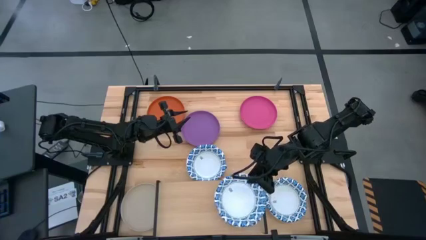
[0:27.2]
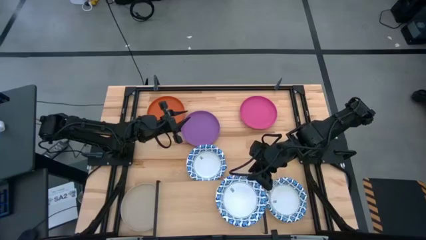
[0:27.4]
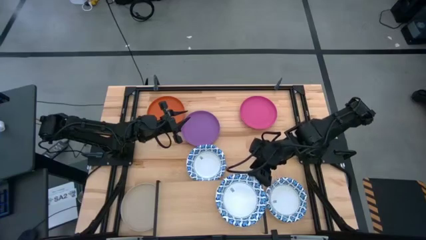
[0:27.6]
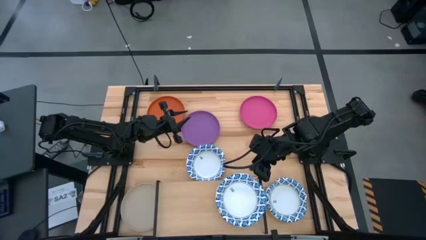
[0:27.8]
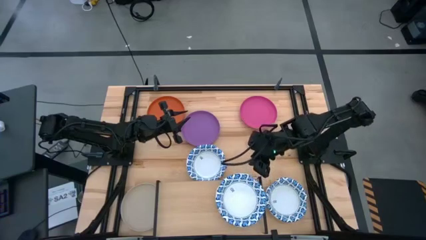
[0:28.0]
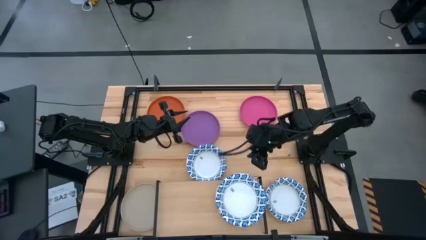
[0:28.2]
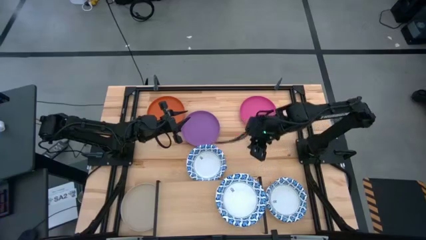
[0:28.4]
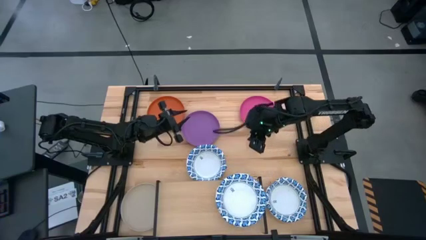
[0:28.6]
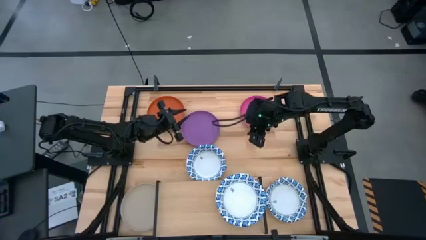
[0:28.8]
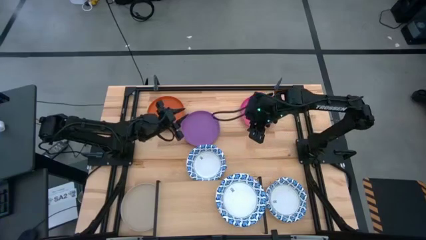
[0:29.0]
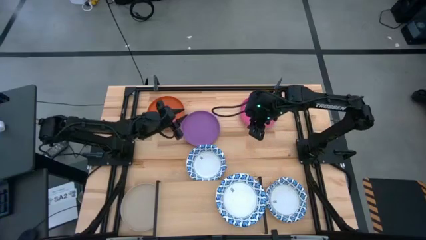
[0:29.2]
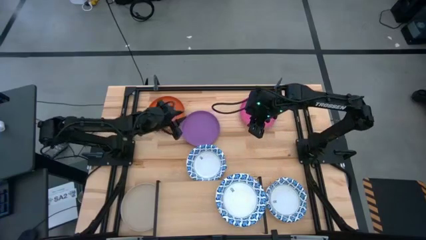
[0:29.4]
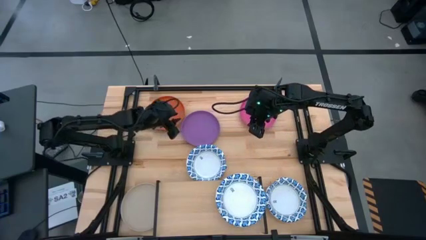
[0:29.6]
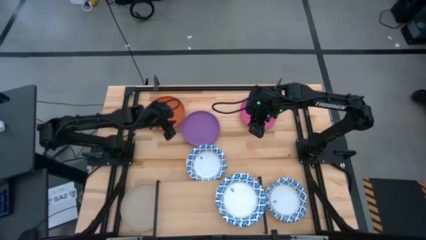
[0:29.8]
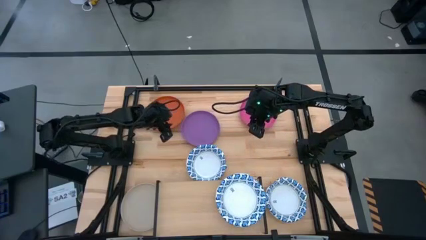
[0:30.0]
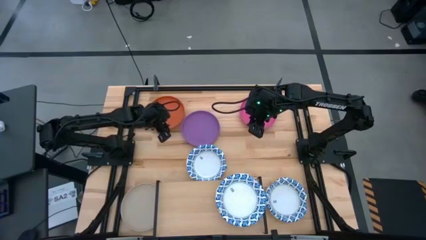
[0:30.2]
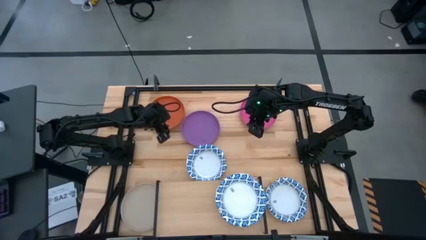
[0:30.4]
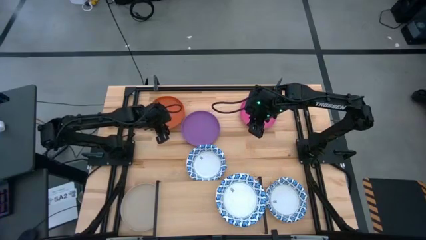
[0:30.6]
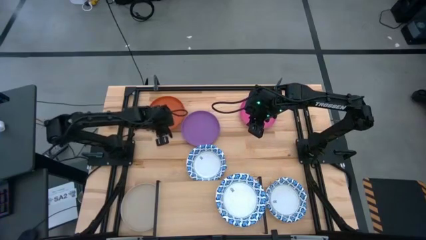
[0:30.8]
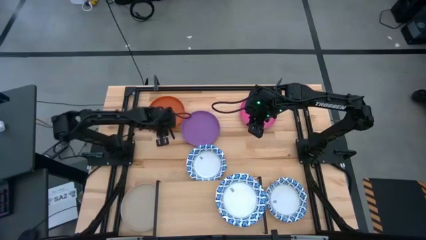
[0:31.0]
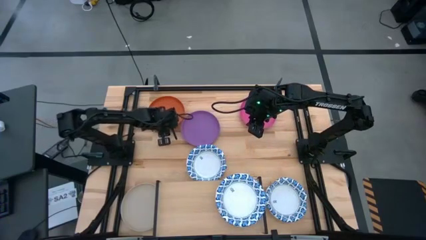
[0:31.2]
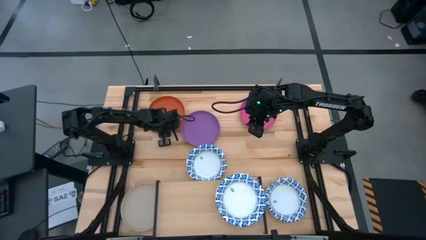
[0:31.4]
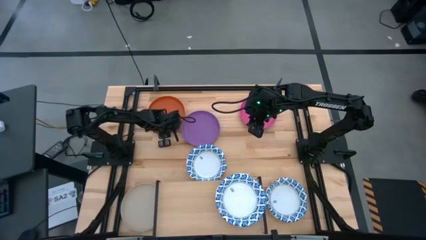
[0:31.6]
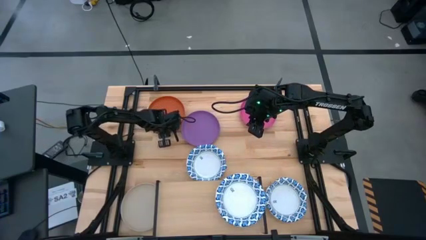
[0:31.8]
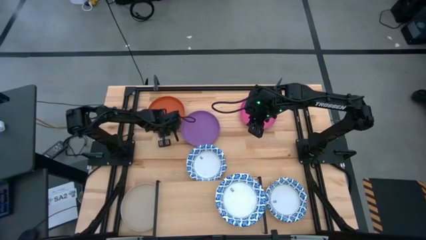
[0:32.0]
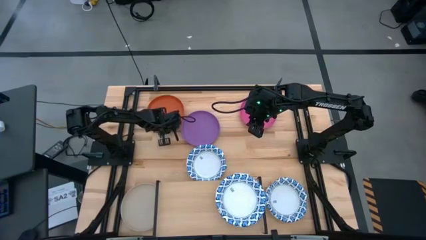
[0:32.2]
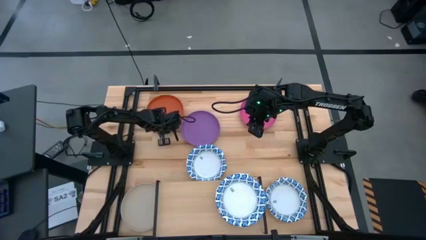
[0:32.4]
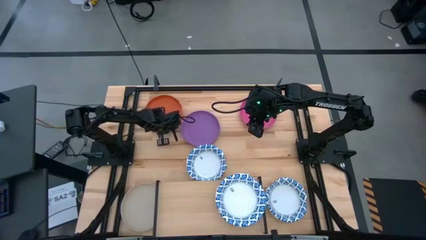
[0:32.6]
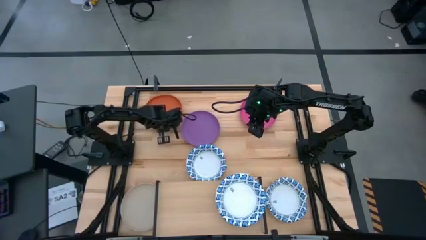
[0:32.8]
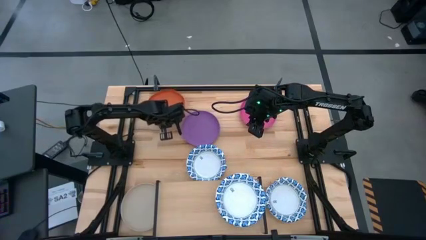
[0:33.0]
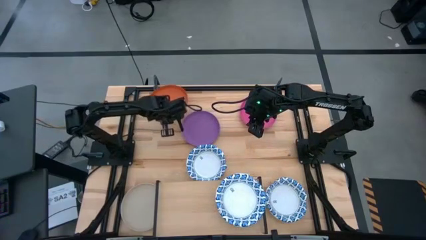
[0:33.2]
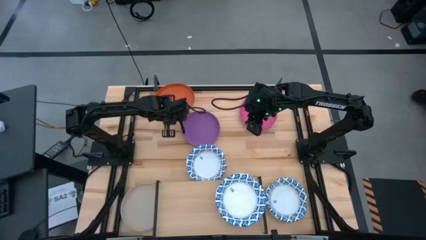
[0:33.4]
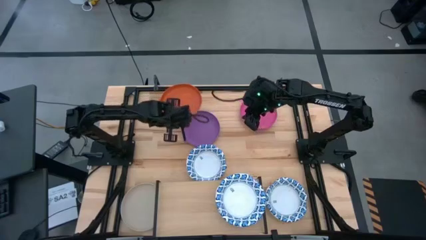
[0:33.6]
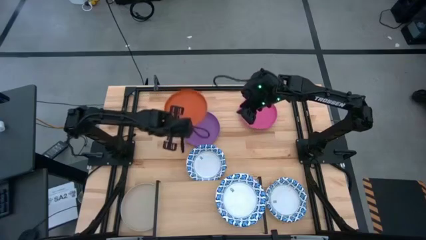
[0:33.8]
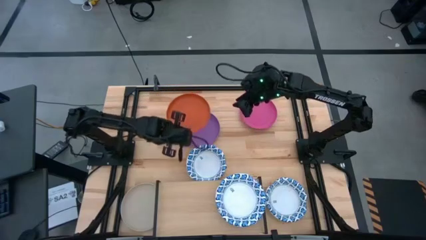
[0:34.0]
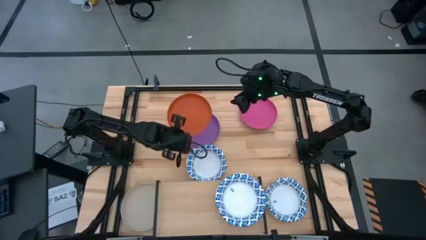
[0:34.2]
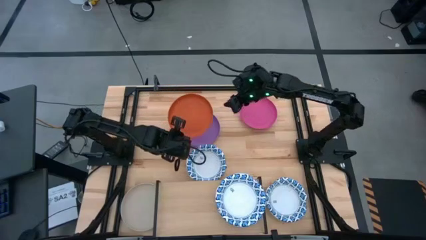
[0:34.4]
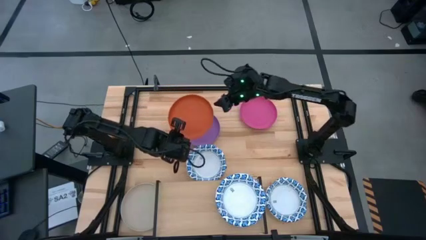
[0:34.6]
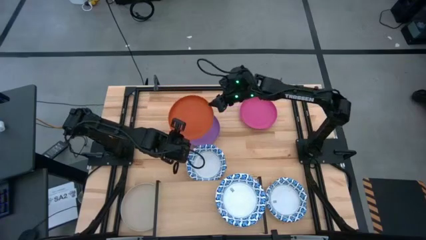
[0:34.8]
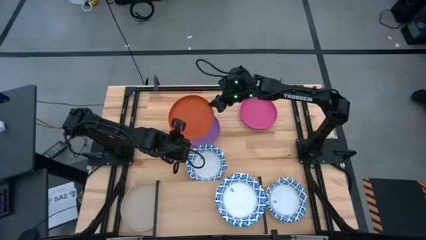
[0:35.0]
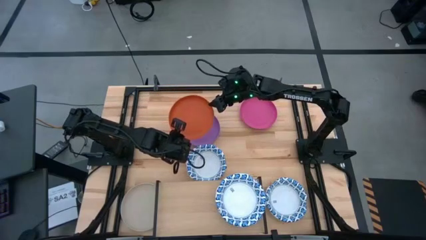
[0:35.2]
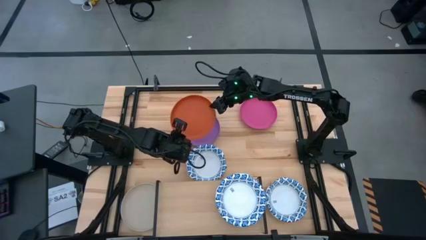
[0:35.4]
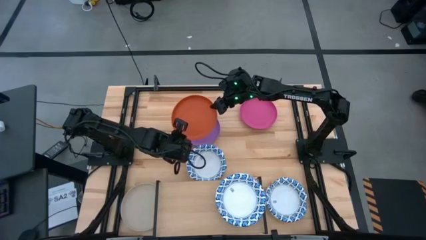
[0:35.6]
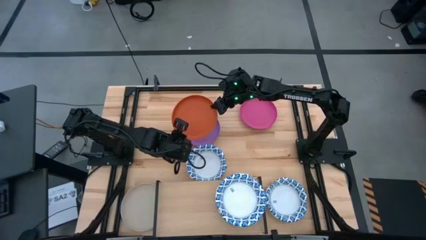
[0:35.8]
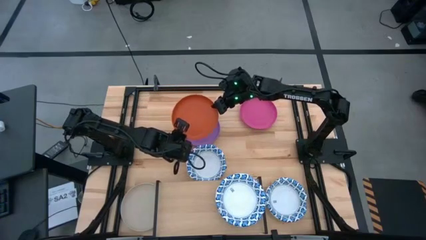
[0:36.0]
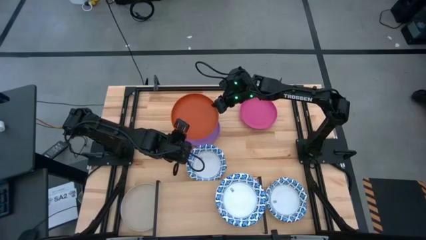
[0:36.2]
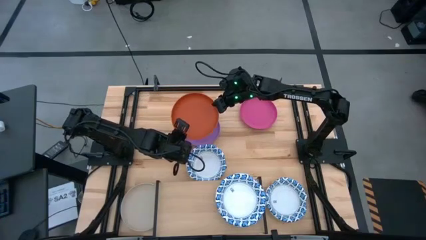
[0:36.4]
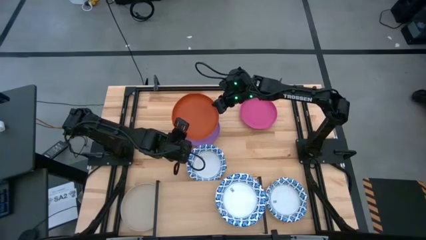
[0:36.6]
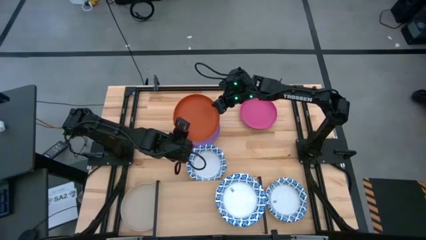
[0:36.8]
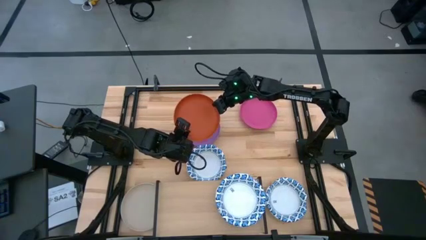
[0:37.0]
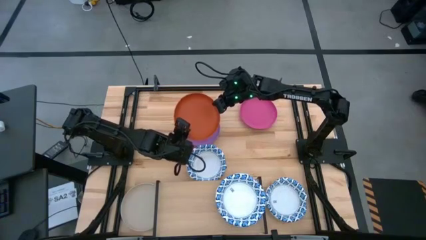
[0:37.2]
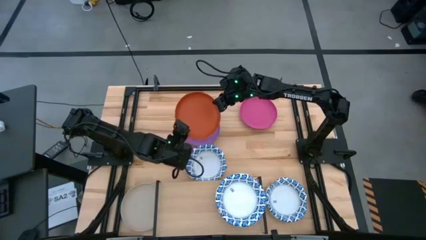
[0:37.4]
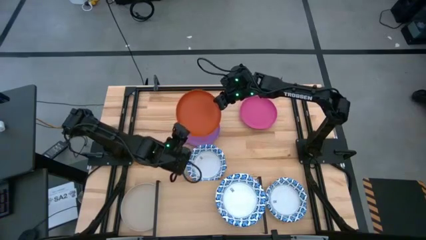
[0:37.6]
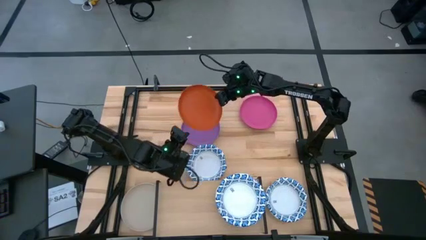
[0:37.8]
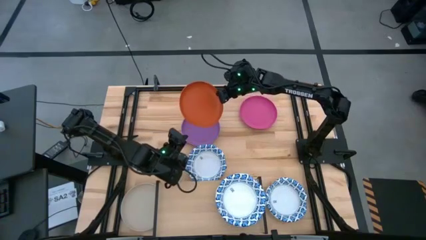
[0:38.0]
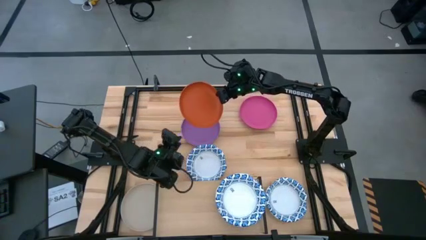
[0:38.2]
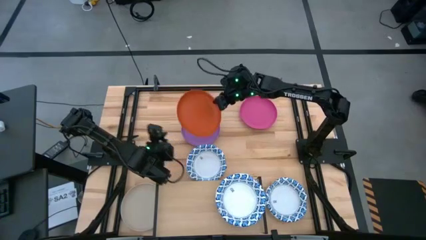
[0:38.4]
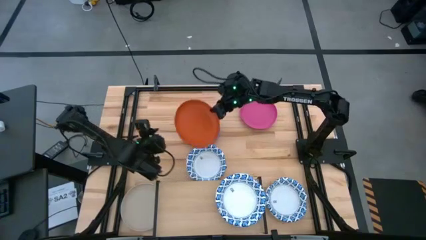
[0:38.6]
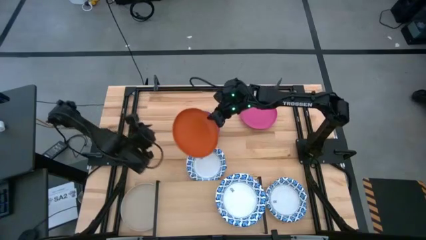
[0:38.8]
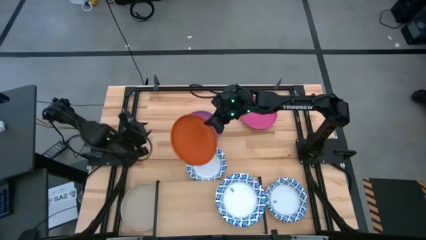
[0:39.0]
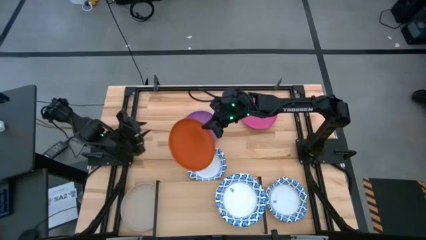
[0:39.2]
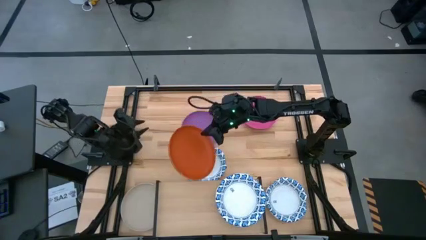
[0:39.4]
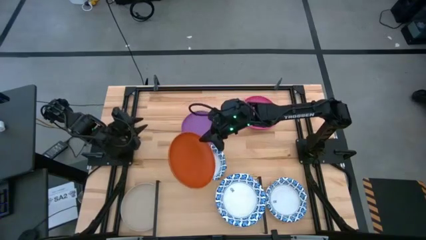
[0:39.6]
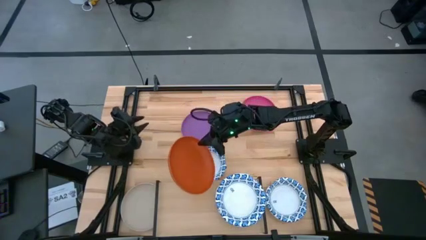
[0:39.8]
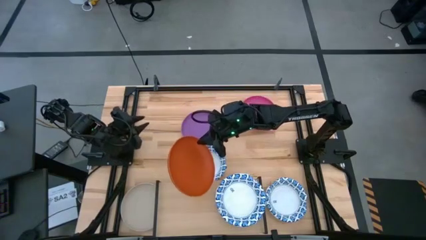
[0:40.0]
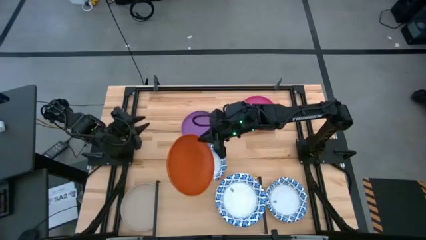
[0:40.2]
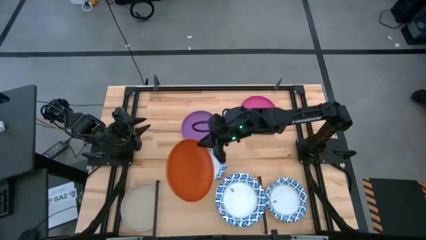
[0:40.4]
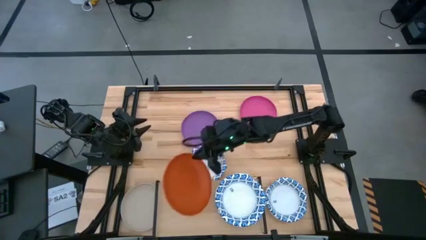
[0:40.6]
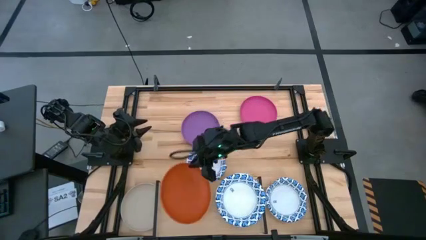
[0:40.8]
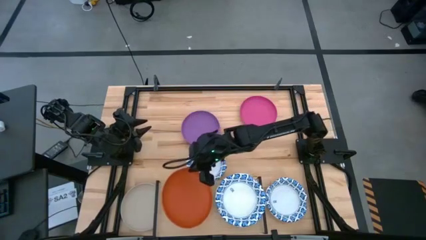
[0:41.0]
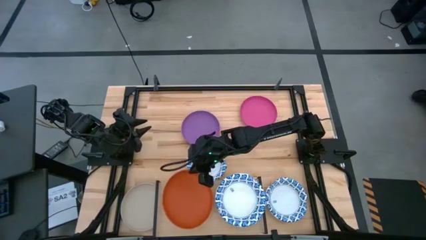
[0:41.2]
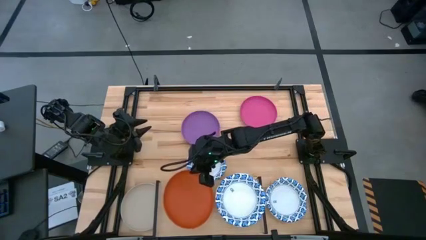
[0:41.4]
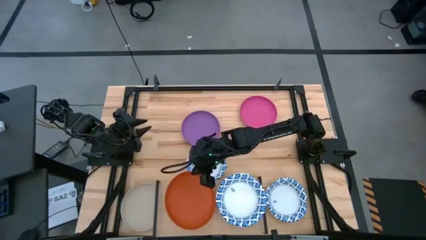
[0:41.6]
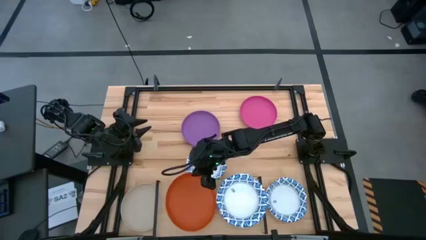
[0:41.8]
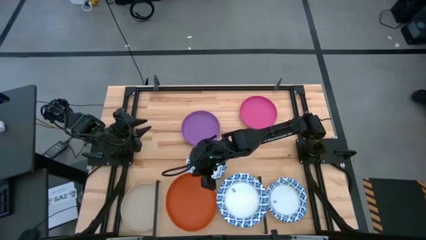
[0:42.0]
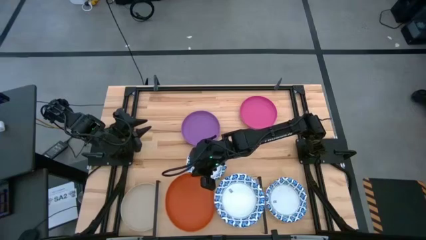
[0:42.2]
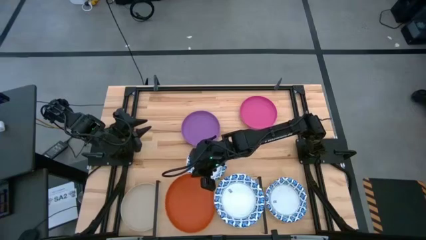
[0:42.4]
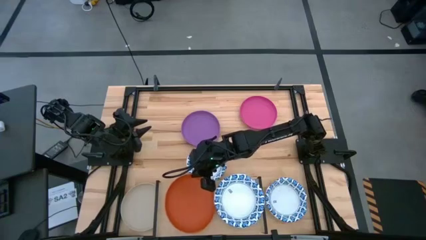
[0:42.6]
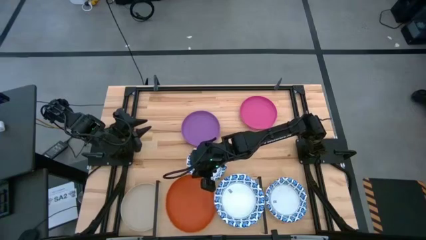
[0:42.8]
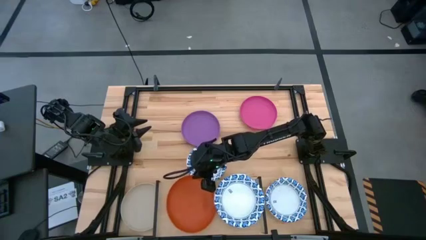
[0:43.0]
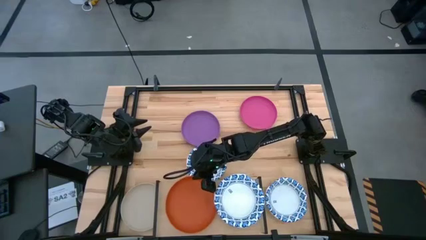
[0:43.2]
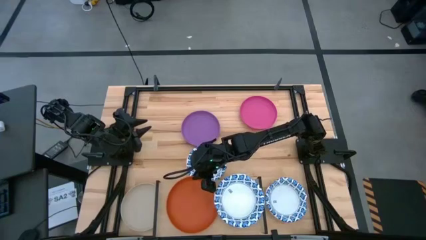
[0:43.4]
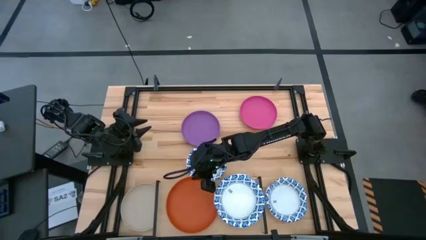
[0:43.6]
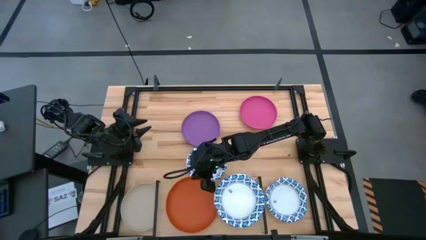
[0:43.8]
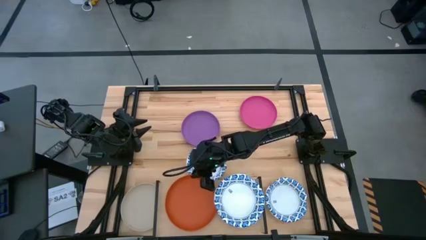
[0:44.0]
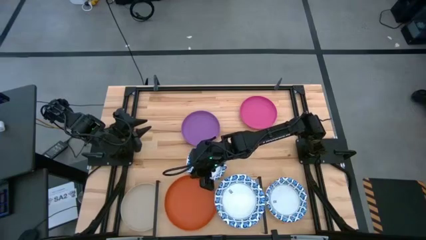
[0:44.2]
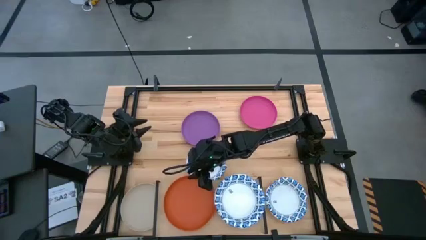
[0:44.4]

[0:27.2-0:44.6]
Task: Place and stack plates onto a shelf
Put the orange plate on the shelf
